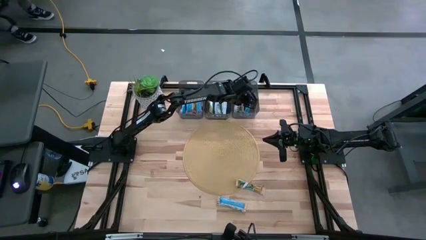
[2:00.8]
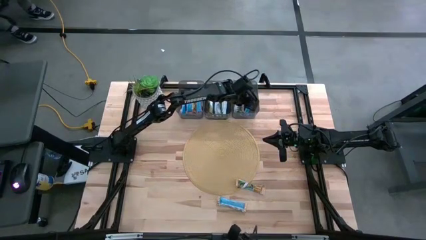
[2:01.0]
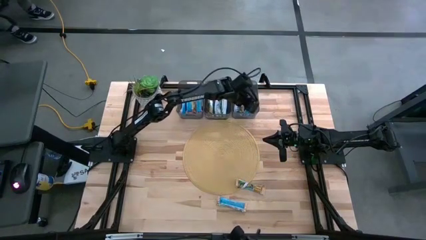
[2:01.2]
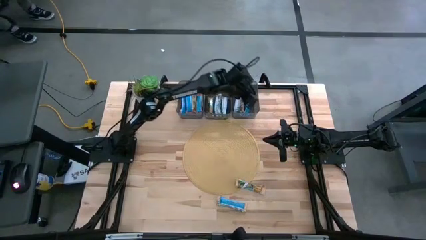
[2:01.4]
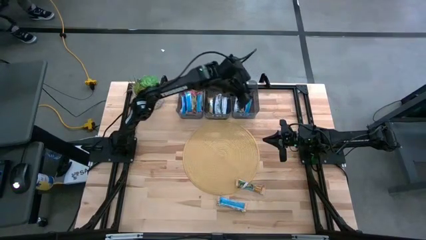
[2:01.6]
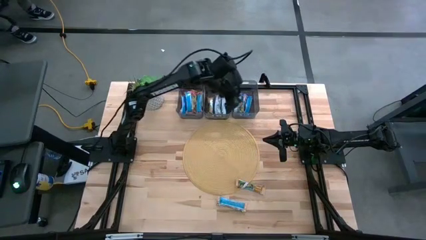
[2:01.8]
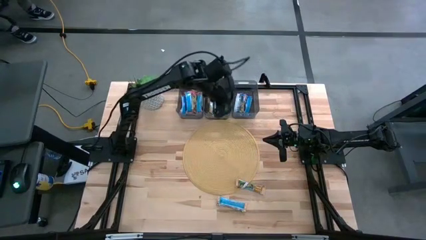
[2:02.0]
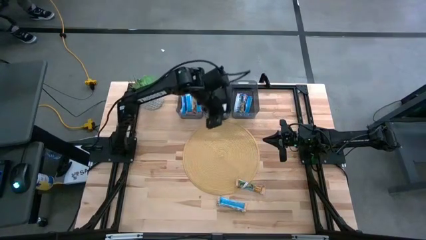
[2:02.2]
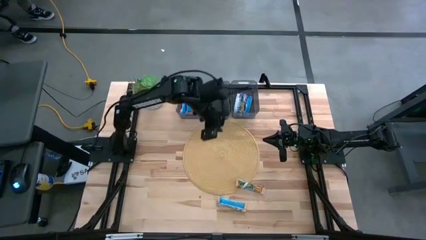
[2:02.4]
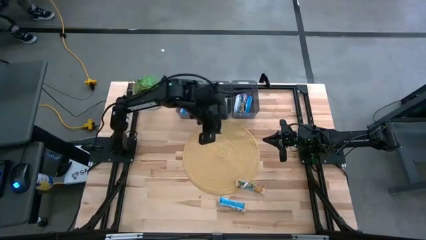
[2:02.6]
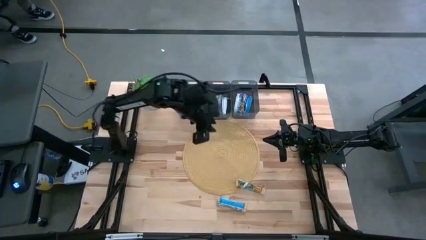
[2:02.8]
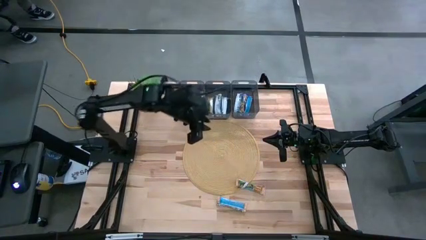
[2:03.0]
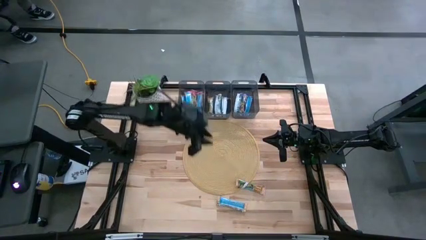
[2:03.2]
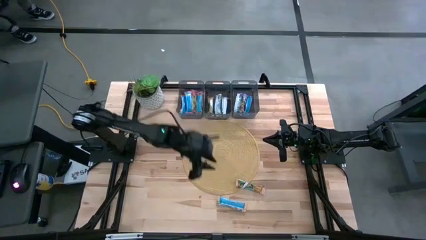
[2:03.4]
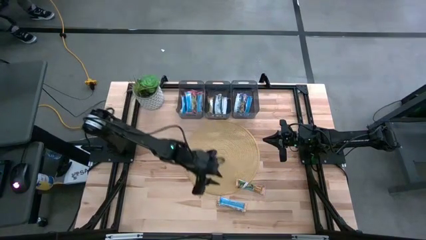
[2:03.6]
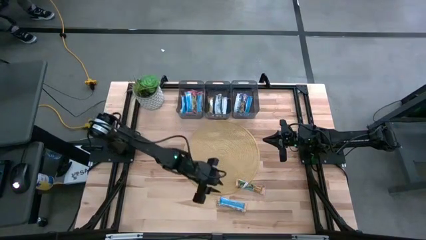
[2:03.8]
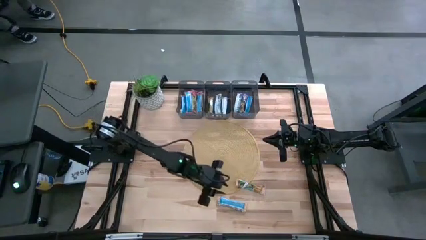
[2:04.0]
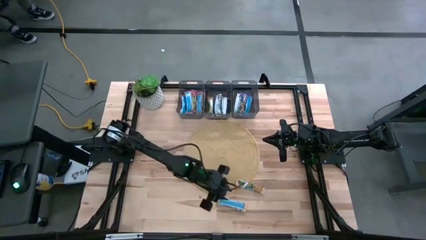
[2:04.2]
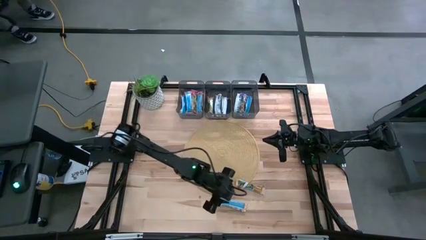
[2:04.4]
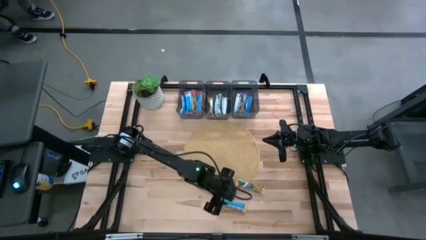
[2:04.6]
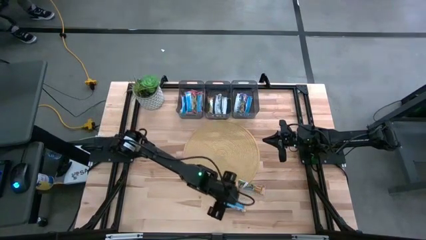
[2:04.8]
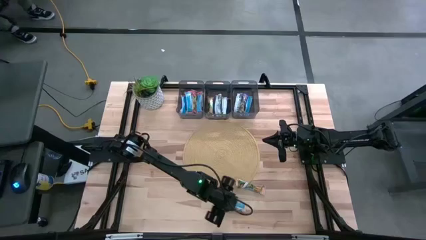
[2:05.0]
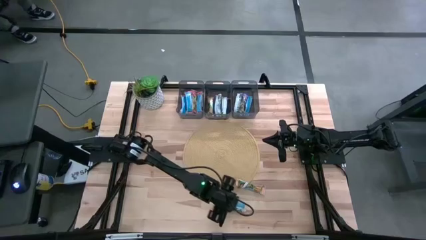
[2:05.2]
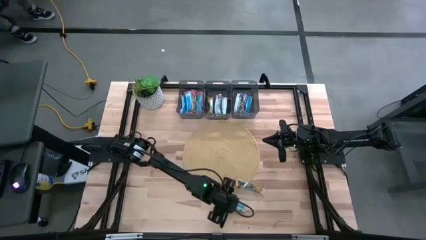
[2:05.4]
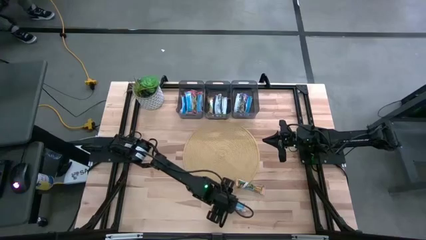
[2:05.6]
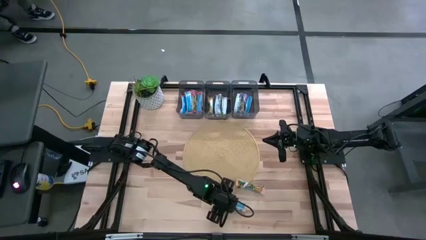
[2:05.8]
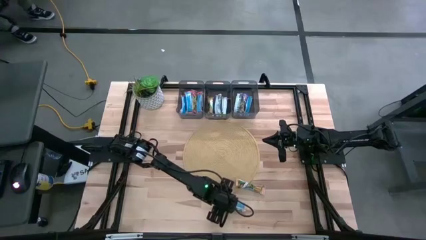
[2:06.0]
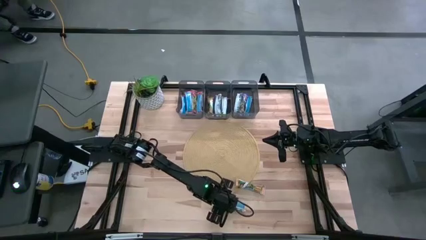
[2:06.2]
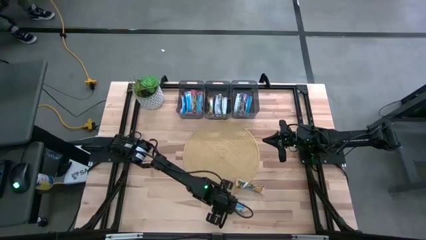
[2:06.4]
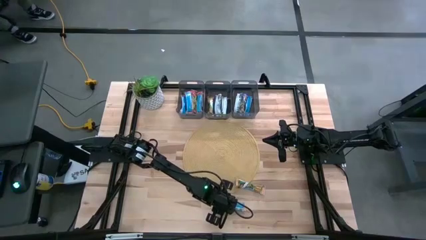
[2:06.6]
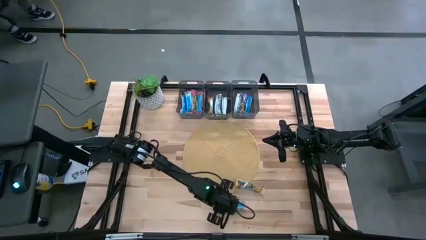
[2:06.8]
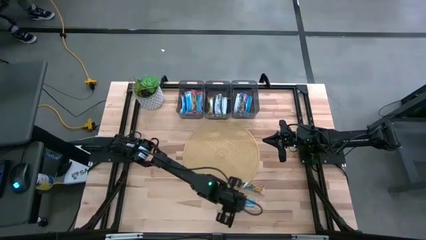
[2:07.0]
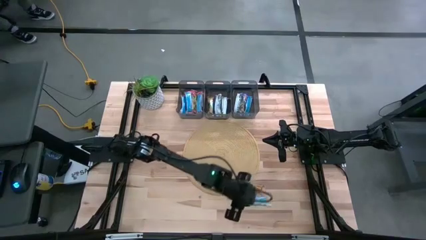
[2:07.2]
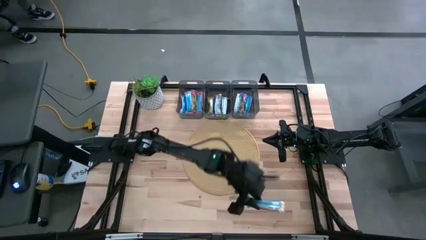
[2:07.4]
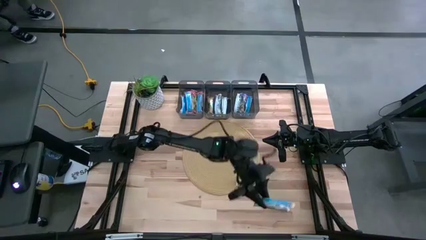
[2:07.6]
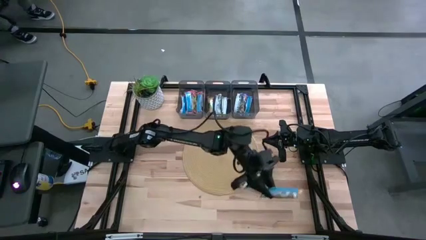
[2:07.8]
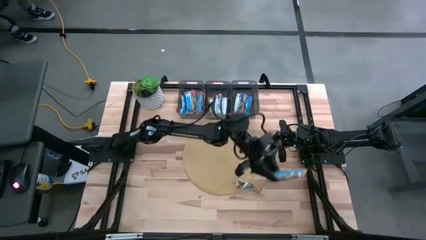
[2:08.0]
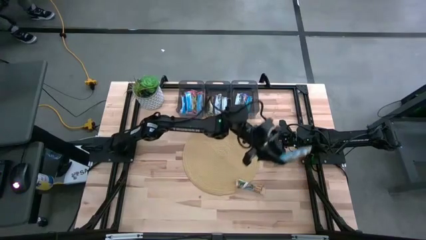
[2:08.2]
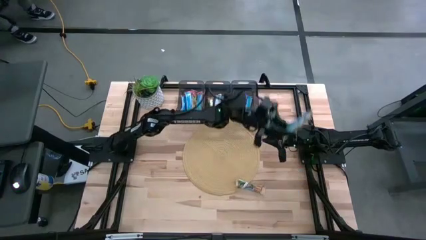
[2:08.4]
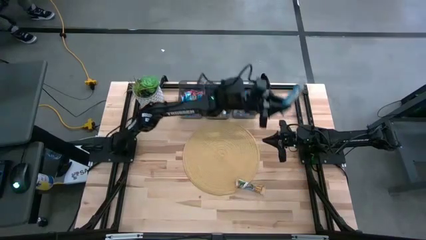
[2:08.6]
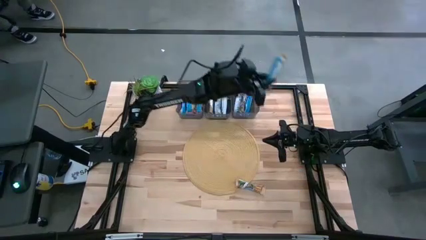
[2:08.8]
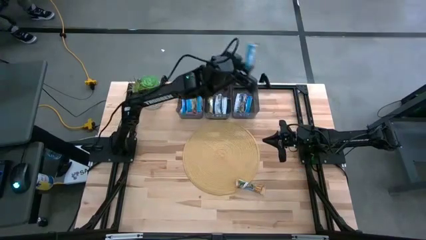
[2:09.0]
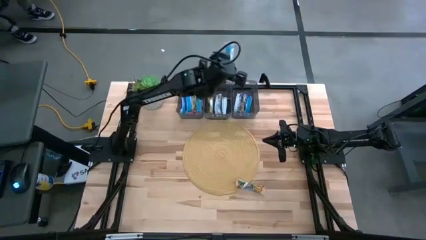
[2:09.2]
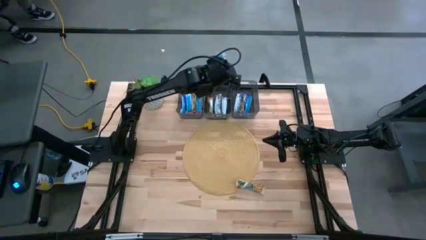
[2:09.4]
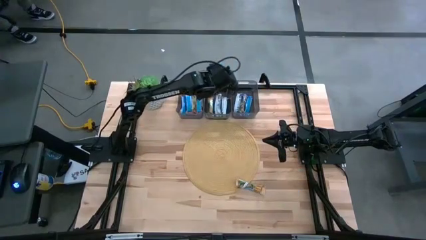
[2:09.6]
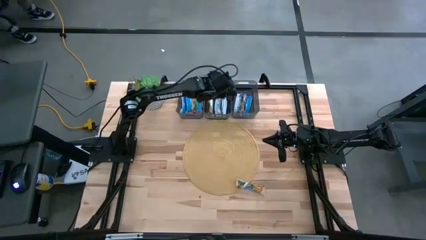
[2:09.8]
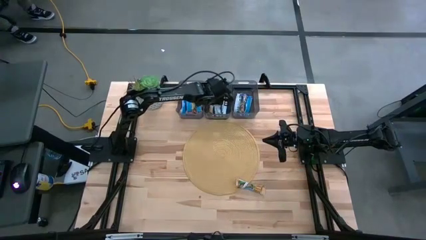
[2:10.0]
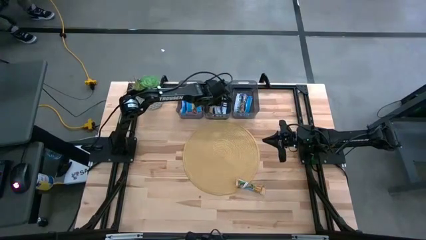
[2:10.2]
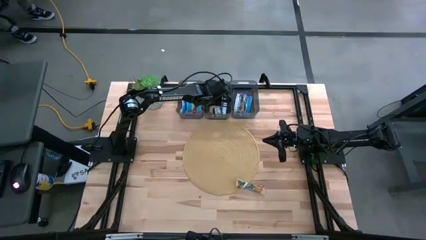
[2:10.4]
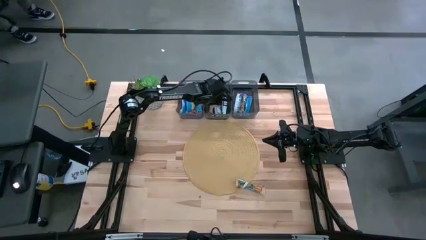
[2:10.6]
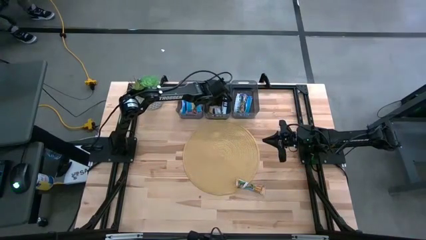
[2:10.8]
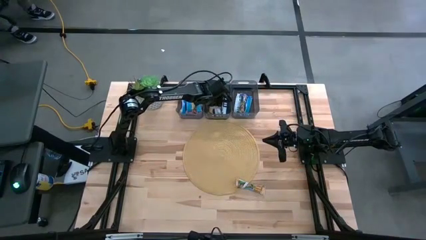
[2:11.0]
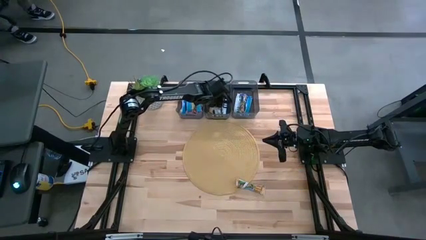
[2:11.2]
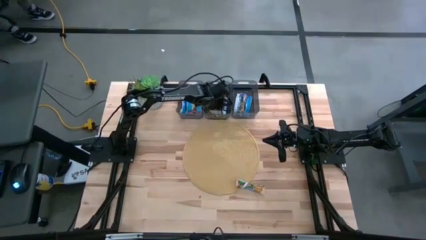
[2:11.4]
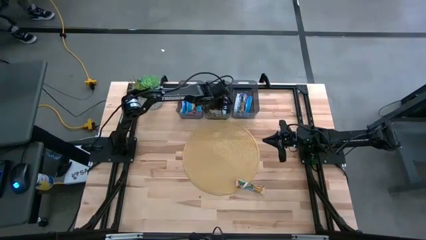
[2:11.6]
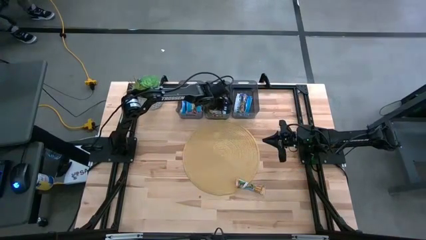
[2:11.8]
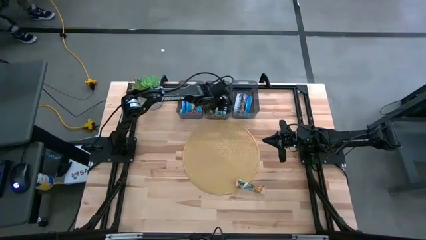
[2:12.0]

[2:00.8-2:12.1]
Task: Pick and place Granola Bars by type
Put the orange granola bar into the center black bin
